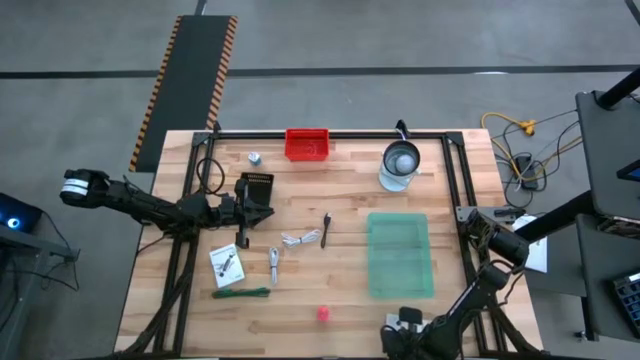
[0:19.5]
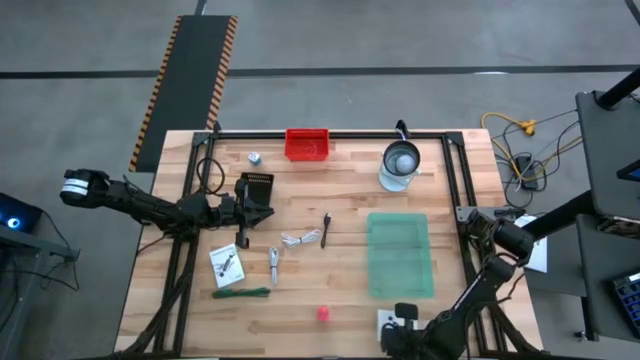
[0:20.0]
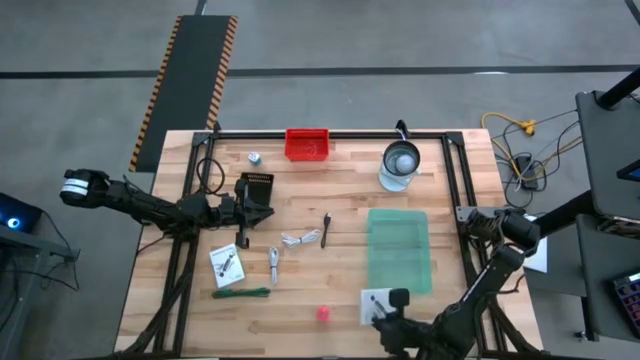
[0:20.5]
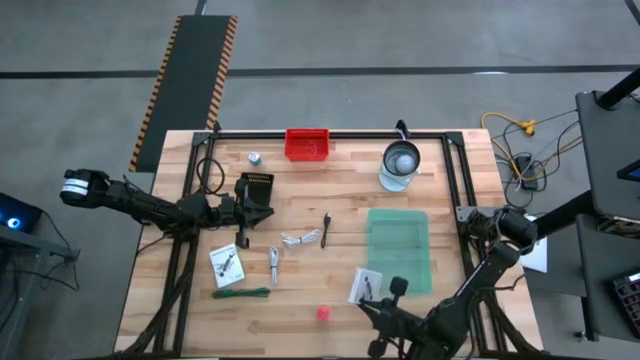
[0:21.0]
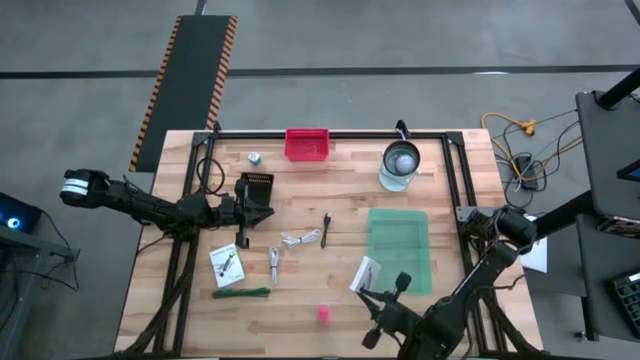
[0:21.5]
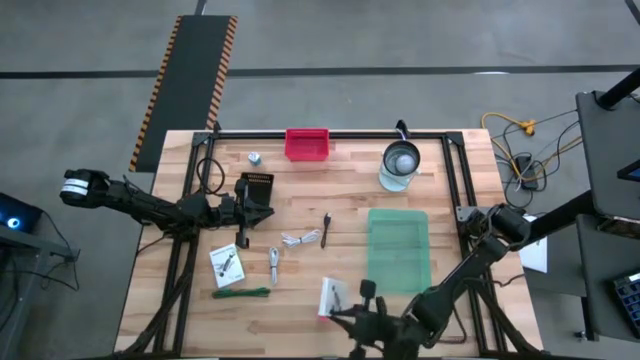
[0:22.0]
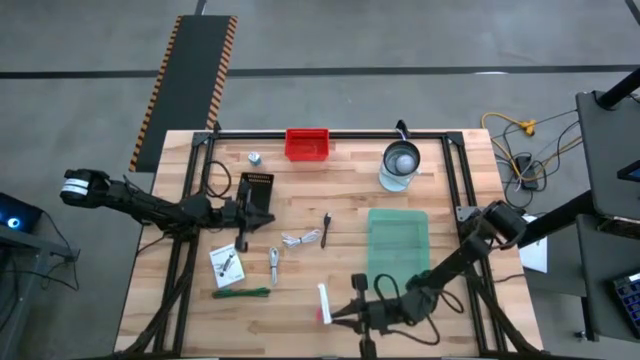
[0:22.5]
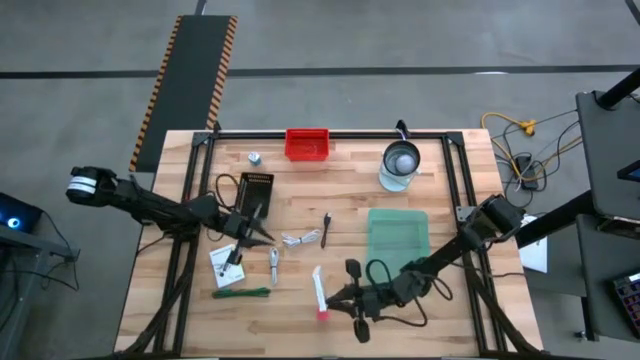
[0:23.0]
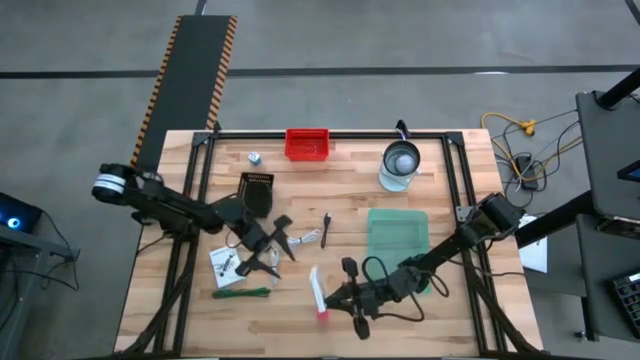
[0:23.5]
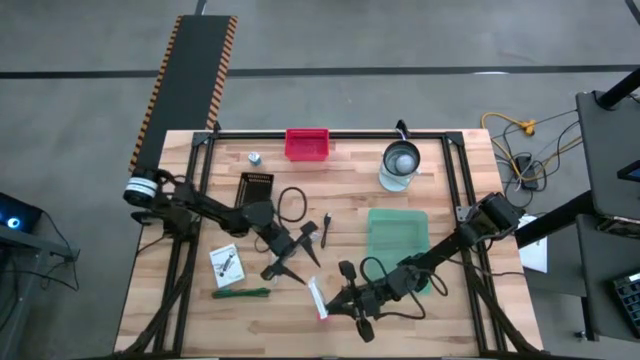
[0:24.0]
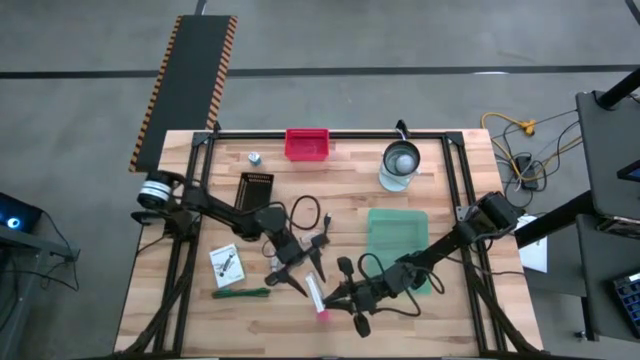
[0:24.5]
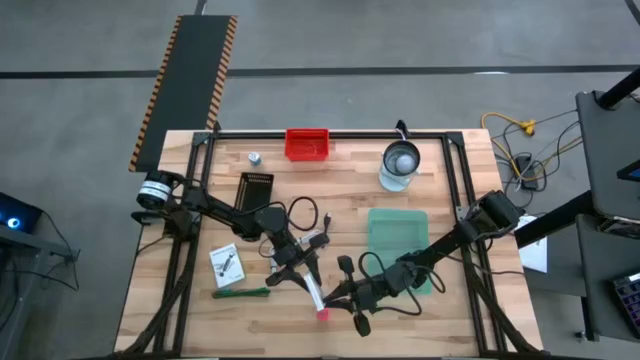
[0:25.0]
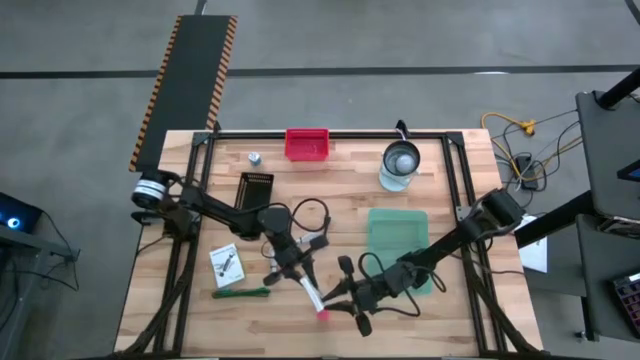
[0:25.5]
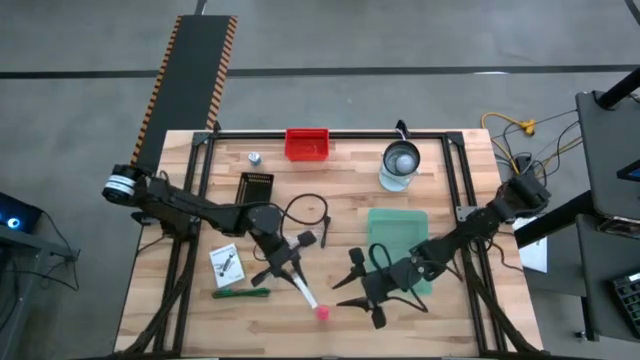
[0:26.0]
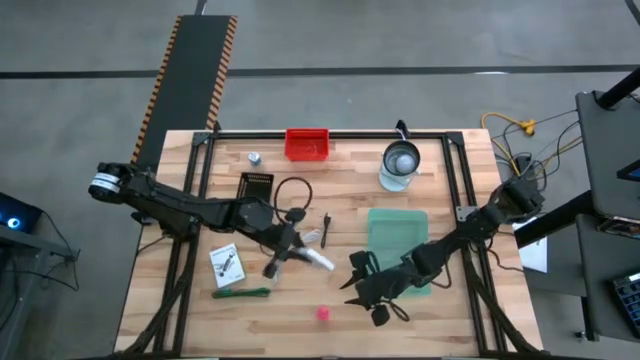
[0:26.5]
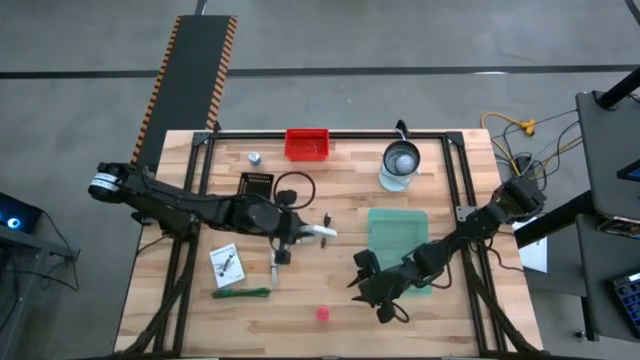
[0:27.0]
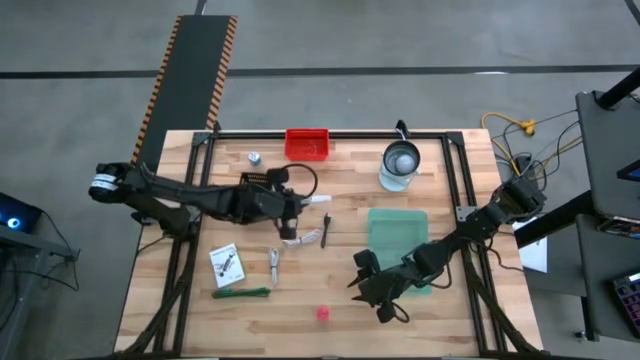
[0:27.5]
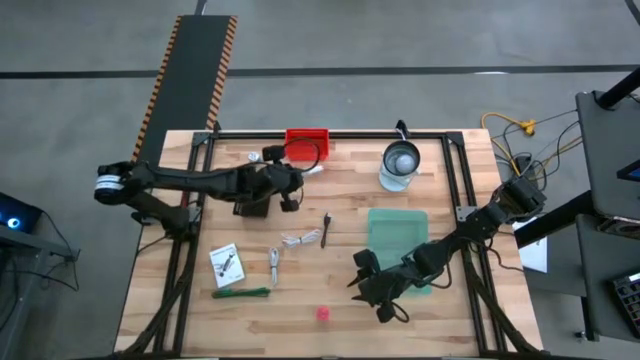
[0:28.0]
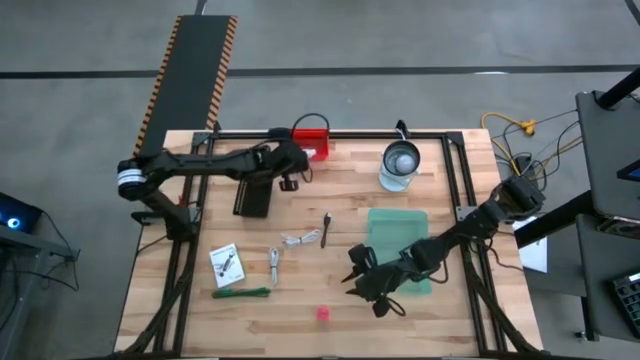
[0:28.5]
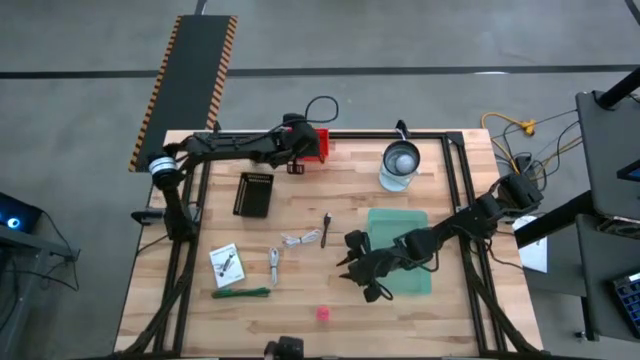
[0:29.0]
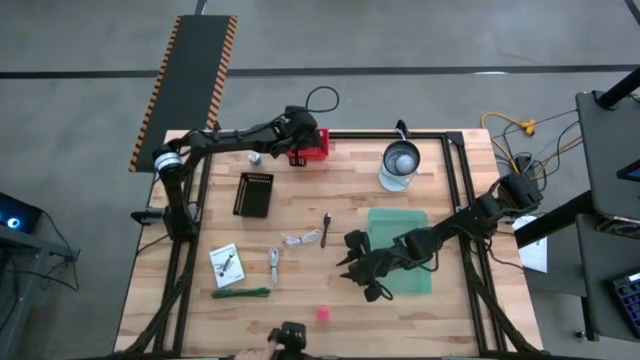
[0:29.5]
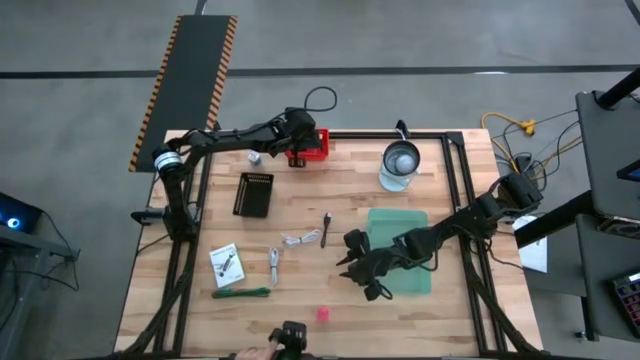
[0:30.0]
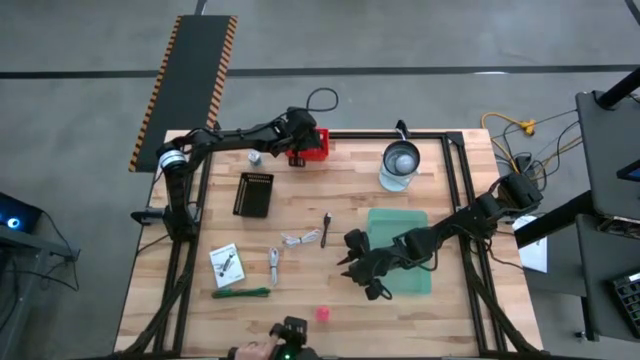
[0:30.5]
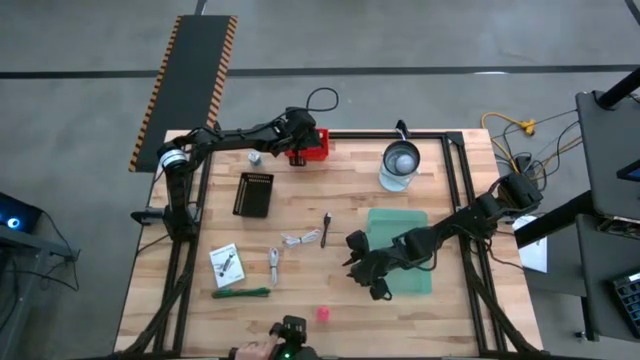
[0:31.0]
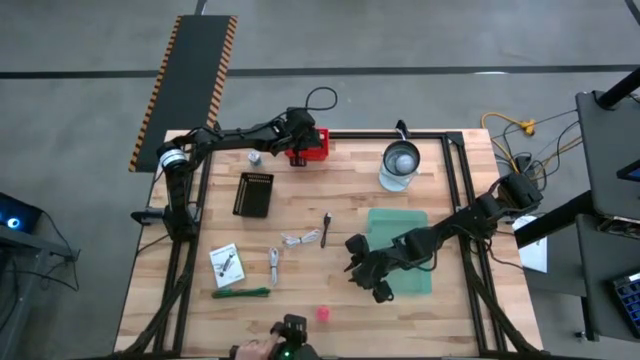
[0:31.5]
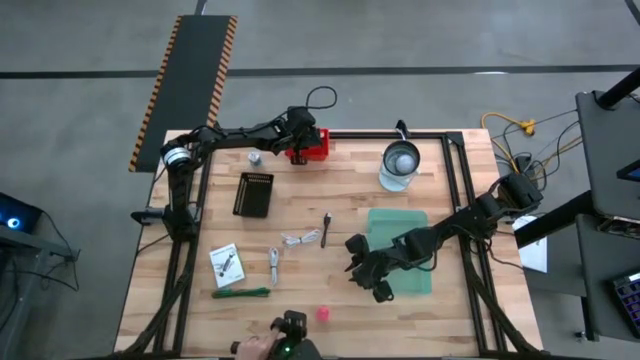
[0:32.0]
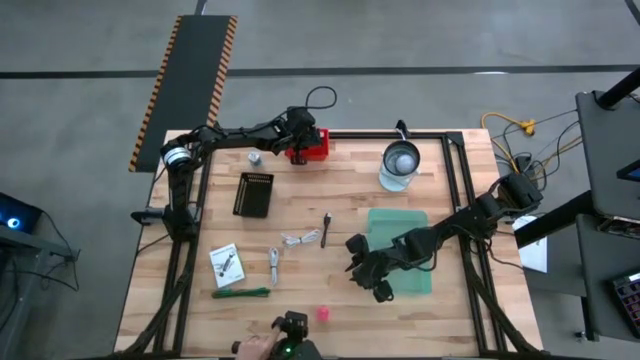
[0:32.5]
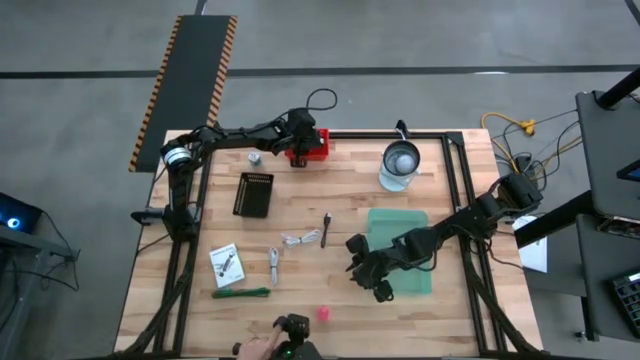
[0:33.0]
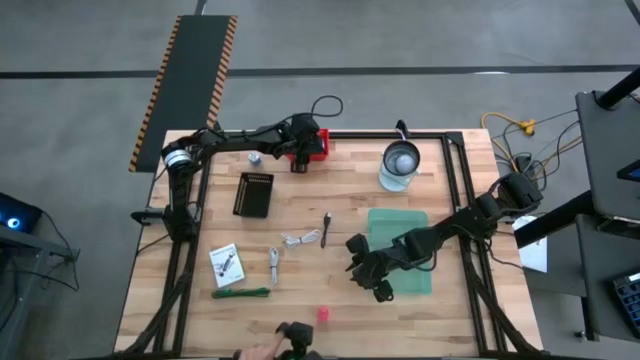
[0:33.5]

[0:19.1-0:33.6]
Task: Pick and place items into bin
Put the bottom card reader box into the red bin

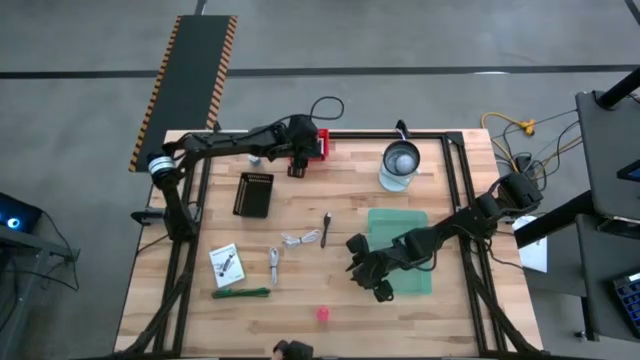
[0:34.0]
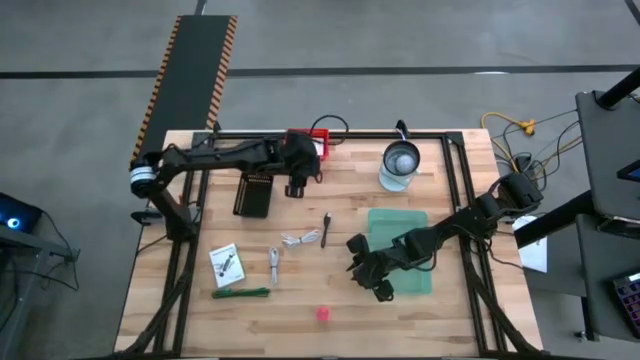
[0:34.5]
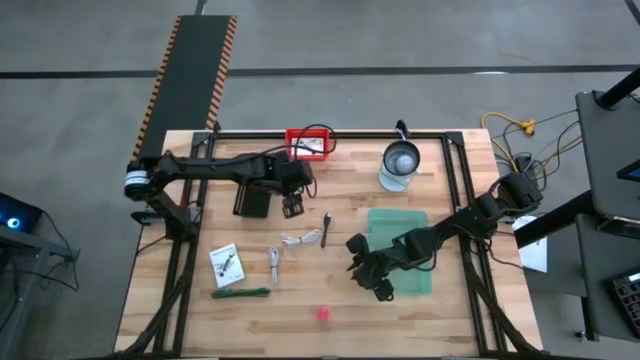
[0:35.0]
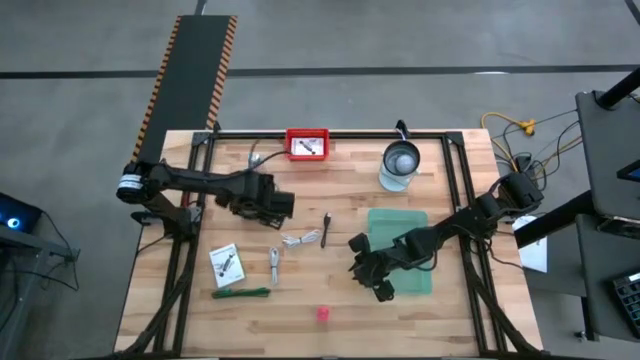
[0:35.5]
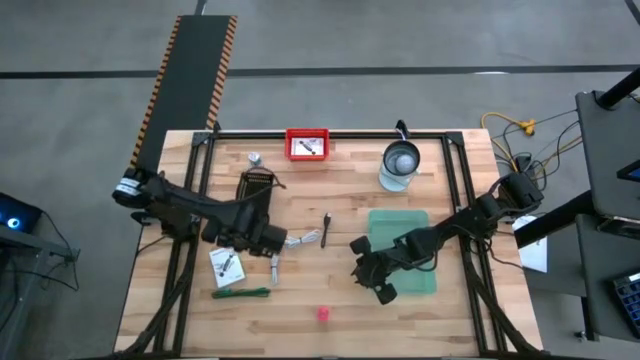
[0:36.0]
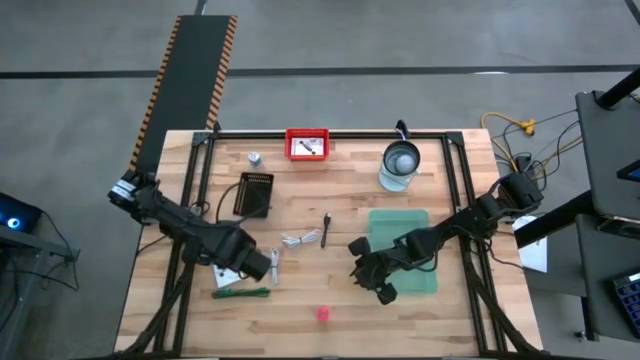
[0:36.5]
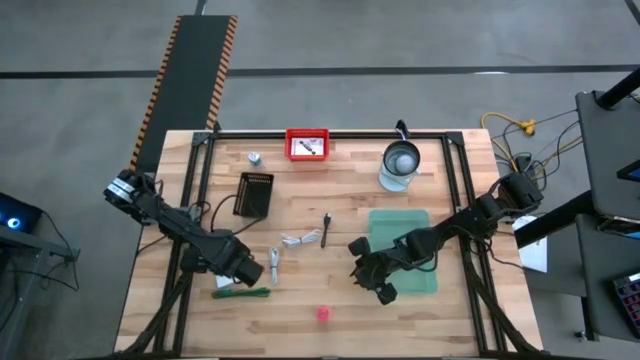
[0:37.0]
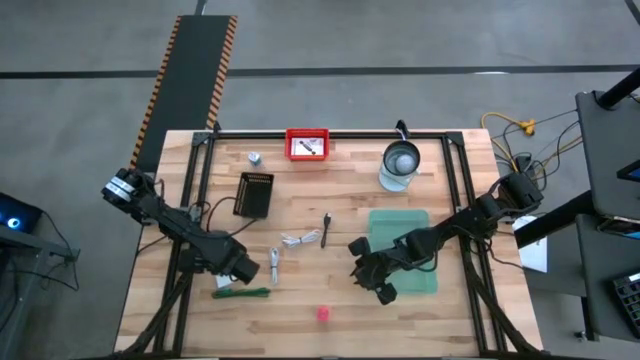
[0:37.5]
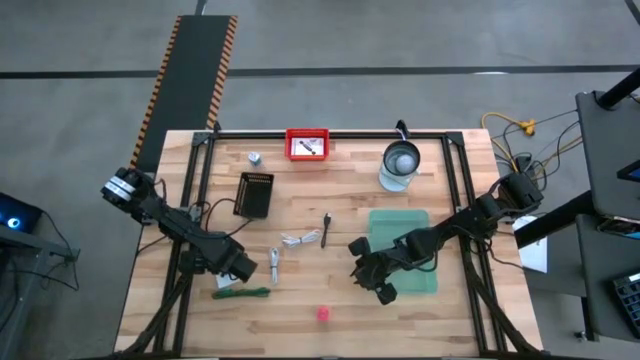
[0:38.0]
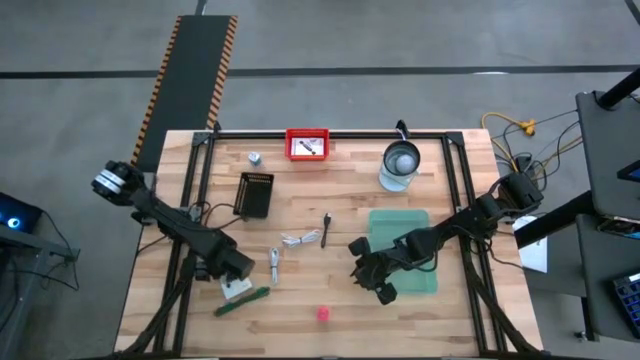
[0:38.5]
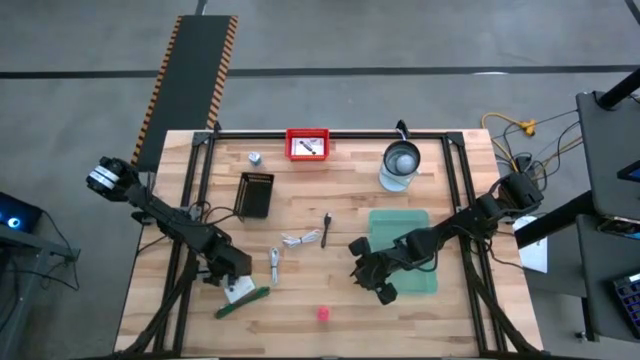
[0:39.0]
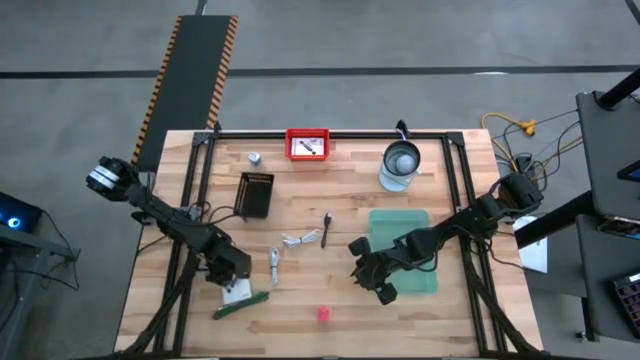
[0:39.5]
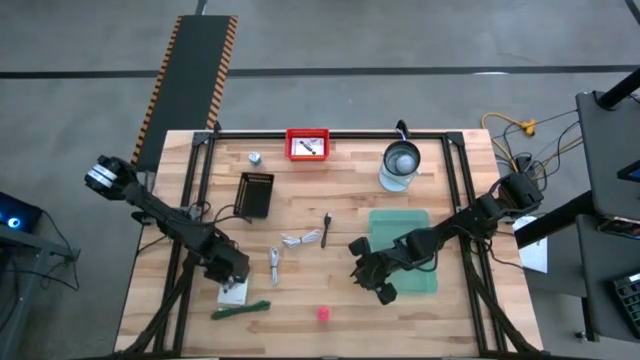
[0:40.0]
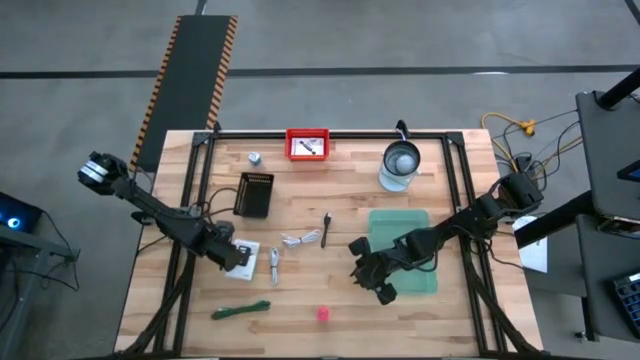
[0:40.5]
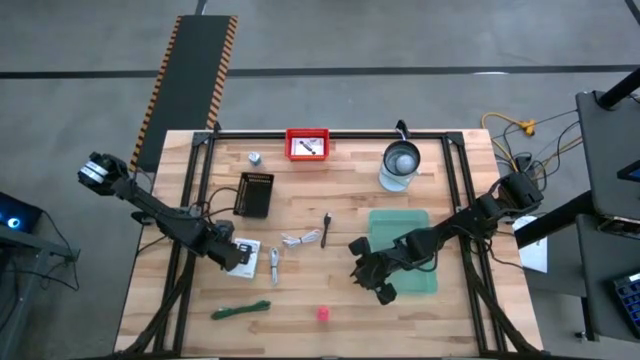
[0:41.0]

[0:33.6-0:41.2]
Put the card reader box into the red bin
